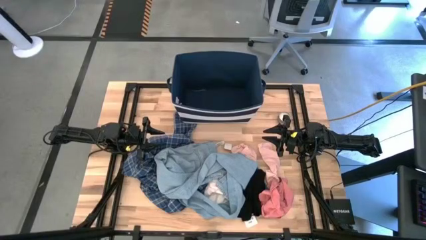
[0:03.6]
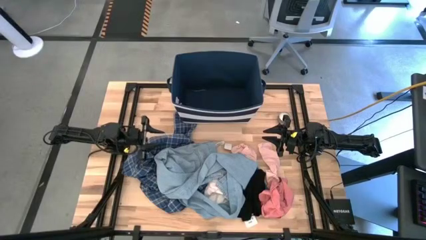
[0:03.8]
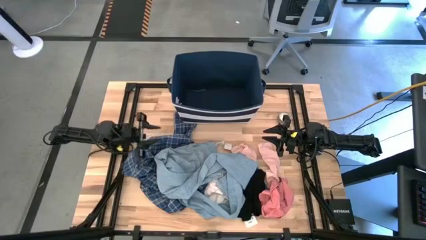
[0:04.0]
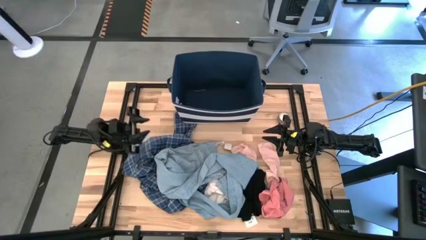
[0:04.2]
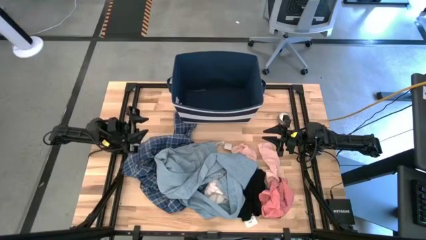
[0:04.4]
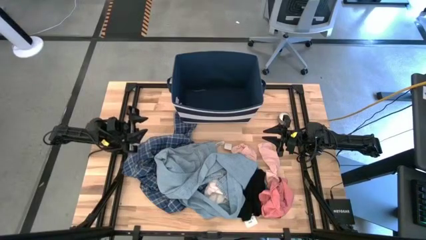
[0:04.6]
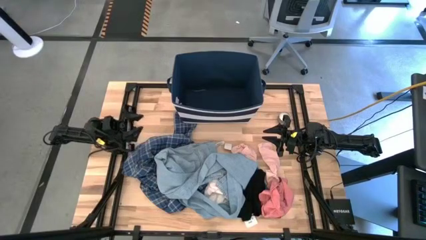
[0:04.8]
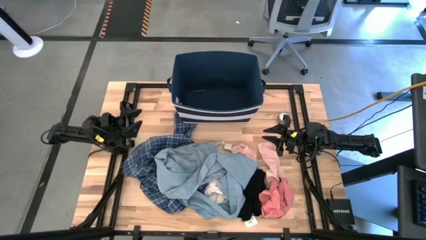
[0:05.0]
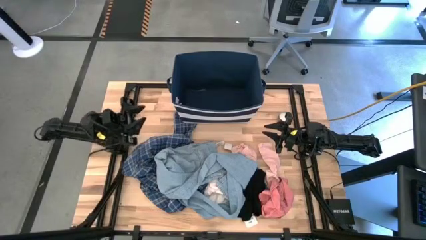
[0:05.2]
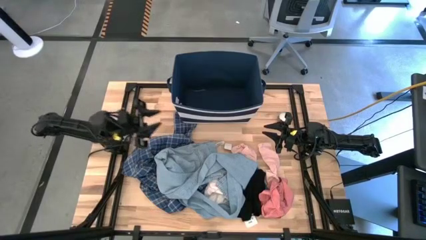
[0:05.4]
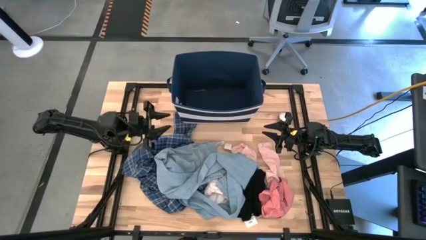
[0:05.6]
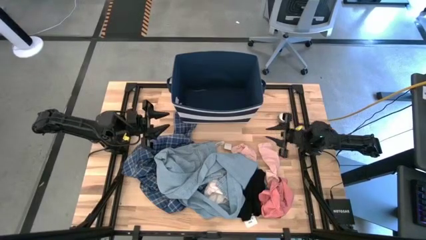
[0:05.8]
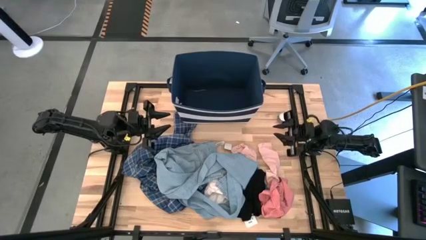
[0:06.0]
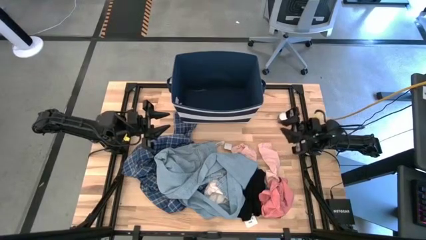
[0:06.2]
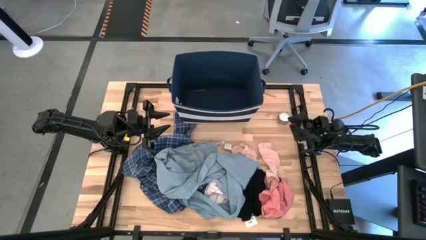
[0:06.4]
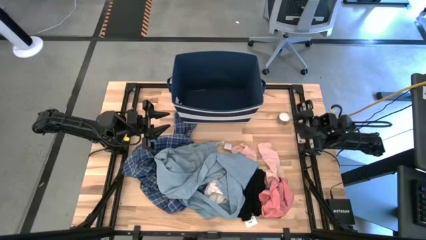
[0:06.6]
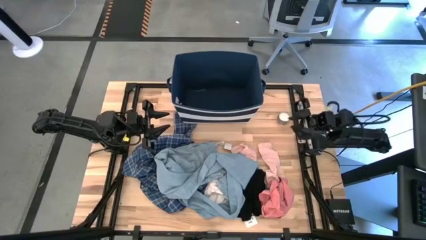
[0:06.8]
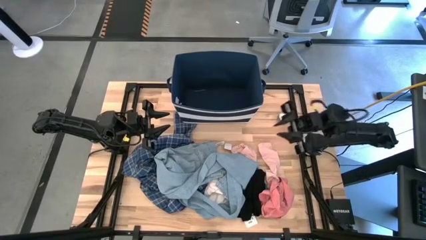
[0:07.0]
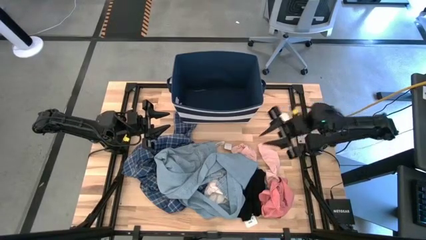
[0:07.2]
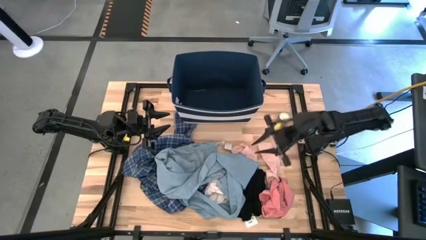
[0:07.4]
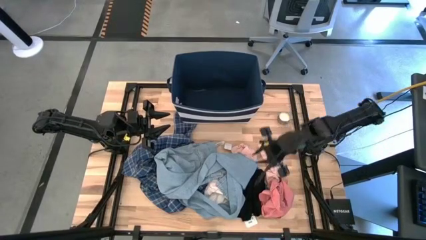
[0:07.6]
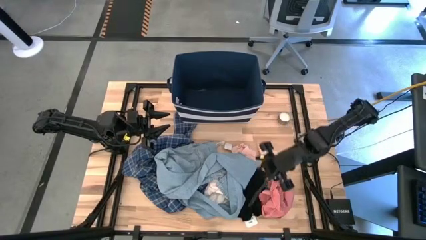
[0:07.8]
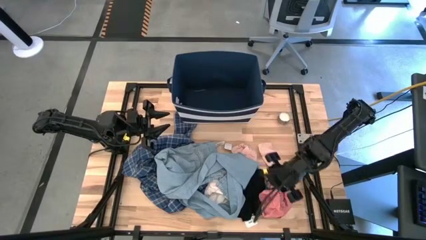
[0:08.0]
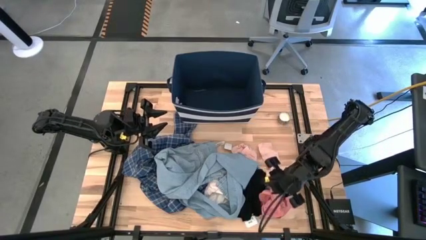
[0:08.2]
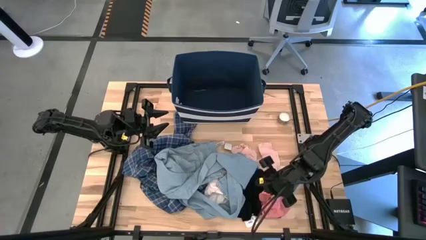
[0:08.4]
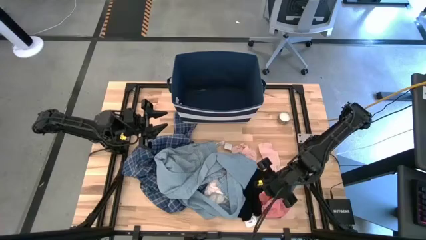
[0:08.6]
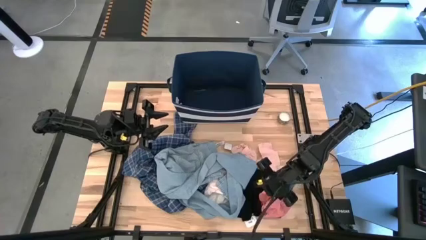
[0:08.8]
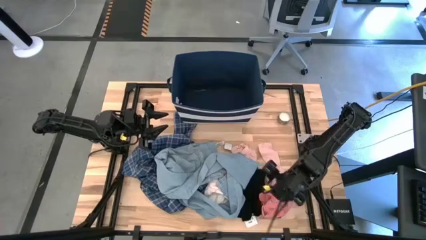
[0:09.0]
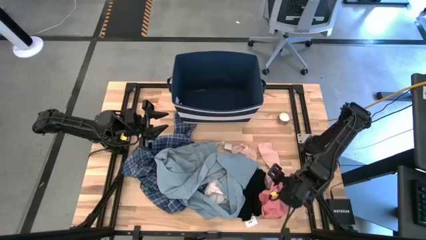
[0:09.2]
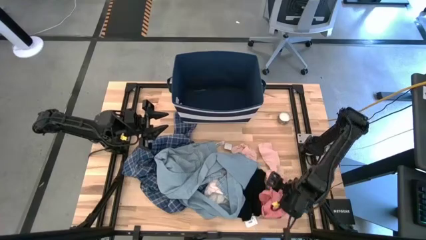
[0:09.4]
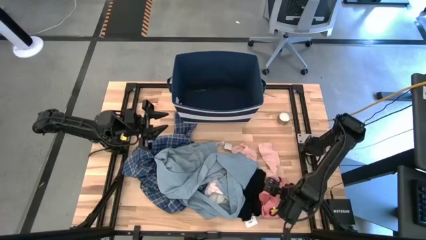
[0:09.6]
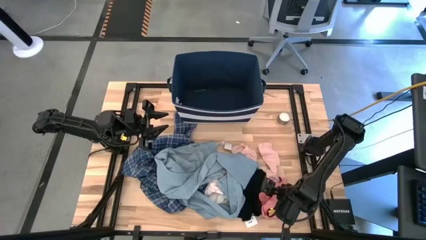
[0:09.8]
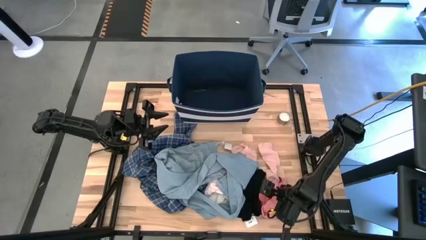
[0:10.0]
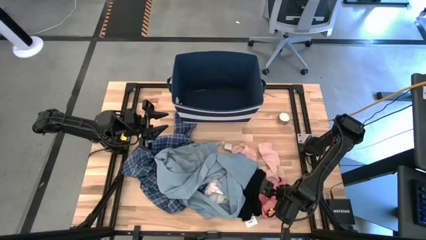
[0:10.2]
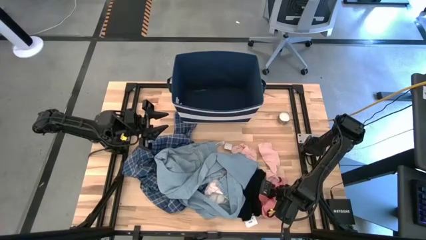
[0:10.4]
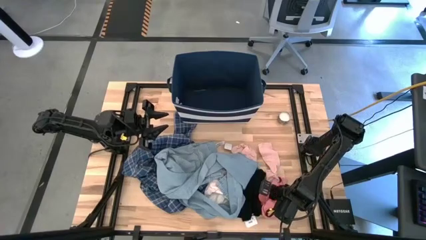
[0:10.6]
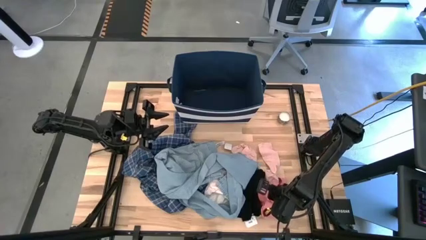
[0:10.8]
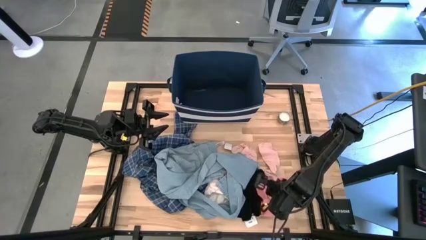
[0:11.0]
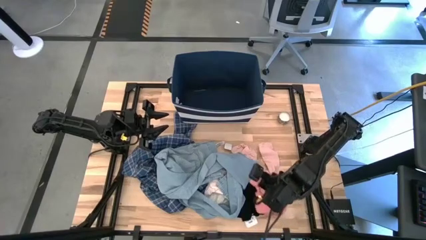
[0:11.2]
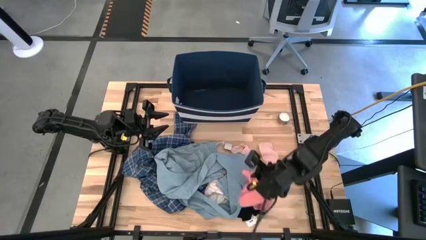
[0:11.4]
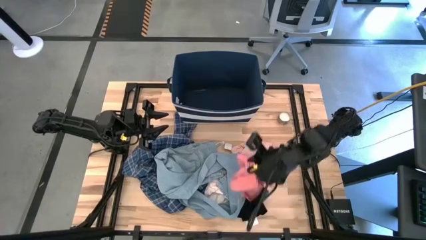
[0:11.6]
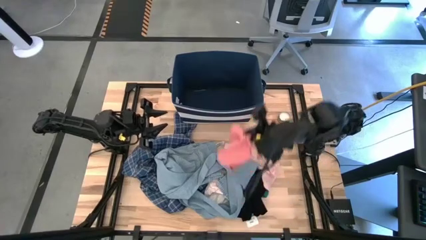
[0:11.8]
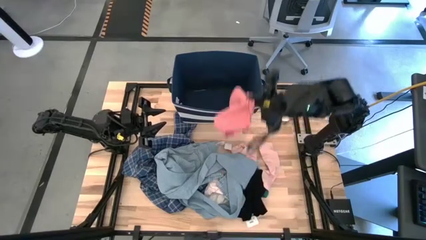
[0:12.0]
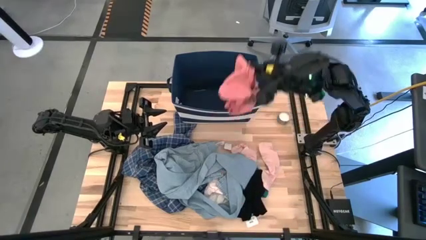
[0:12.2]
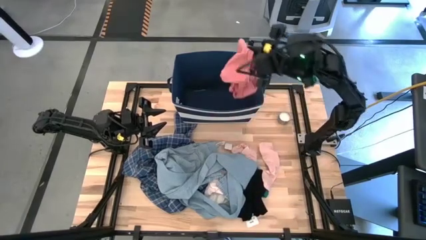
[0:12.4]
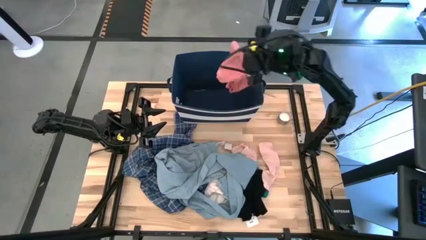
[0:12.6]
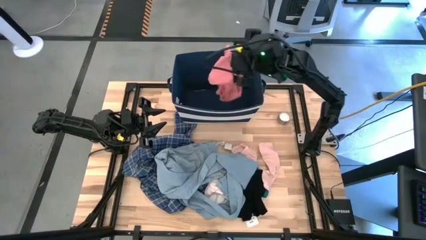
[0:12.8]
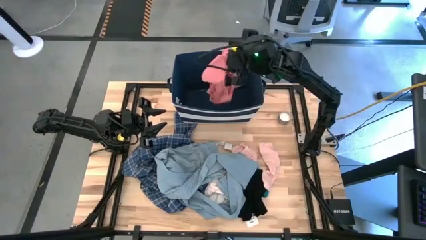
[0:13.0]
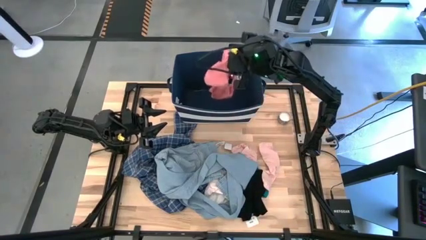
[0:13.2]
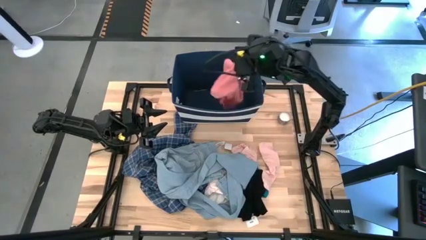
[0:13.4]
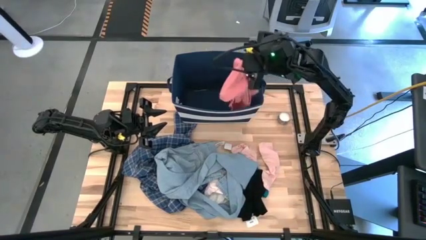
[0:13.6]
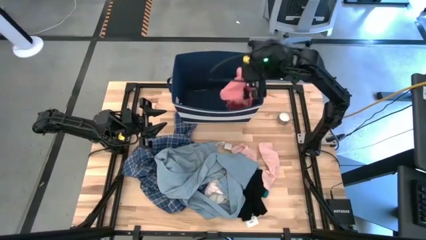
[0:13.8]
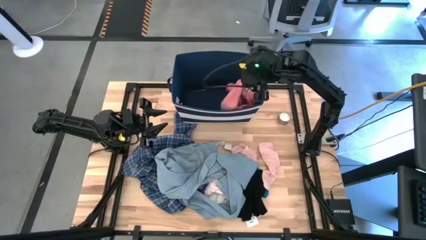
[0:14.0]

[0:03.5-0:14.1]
Task: Sort clothes
Put the pink underwear into the blue laundry bin

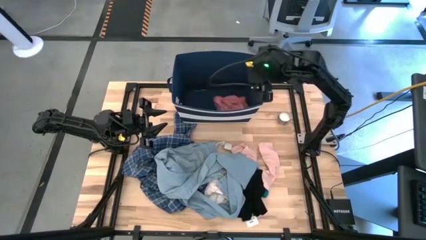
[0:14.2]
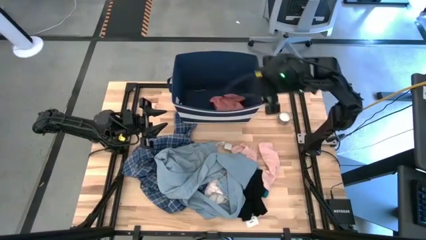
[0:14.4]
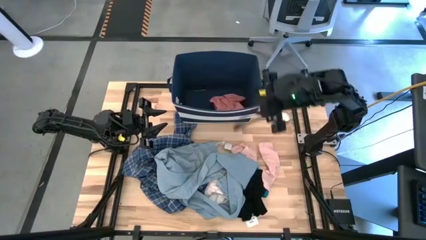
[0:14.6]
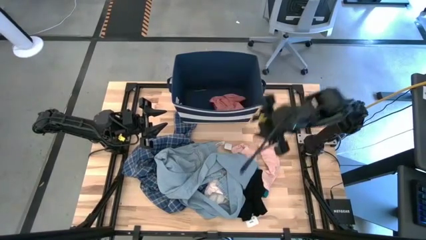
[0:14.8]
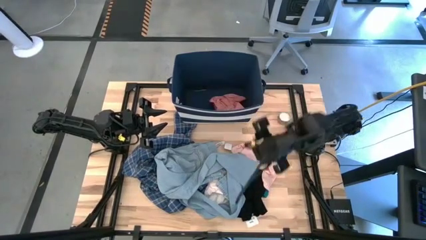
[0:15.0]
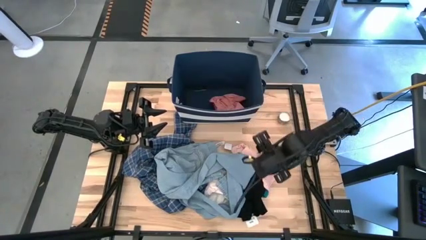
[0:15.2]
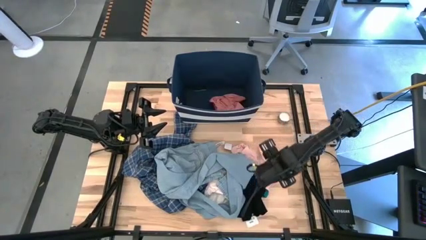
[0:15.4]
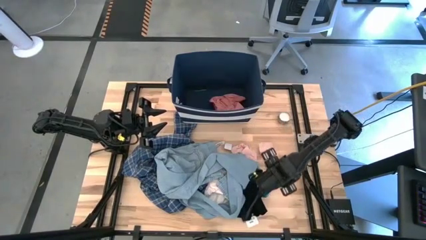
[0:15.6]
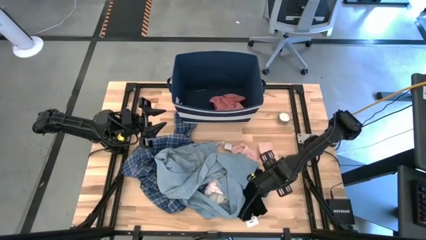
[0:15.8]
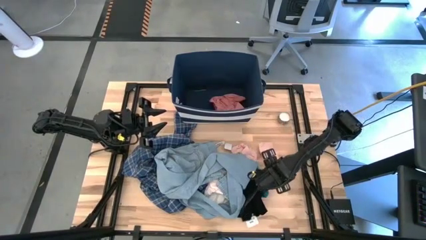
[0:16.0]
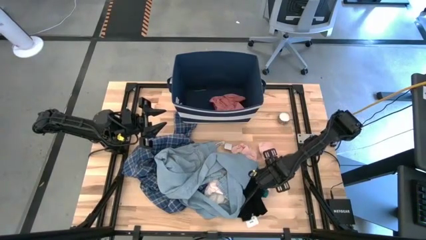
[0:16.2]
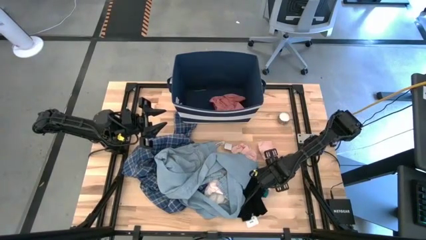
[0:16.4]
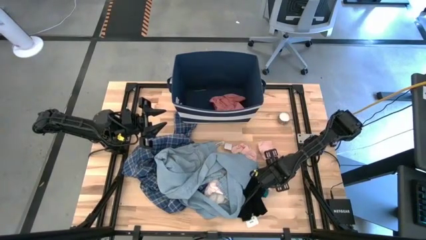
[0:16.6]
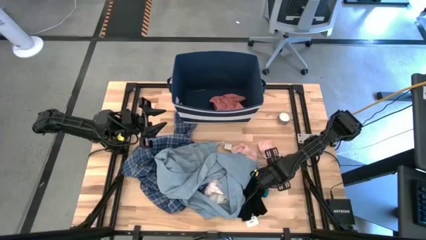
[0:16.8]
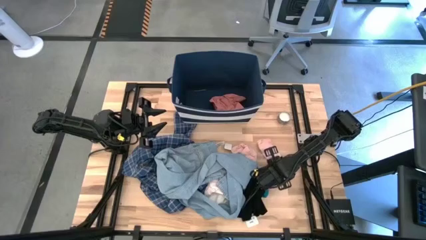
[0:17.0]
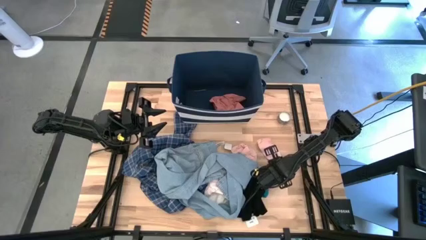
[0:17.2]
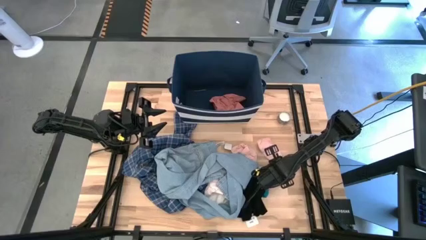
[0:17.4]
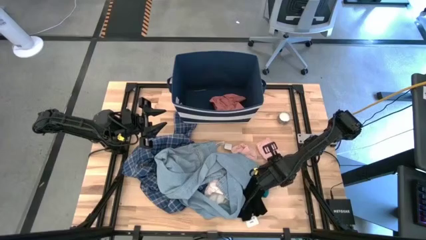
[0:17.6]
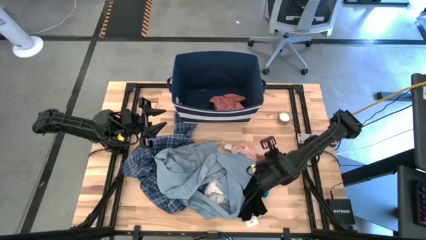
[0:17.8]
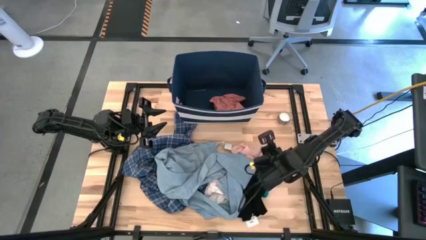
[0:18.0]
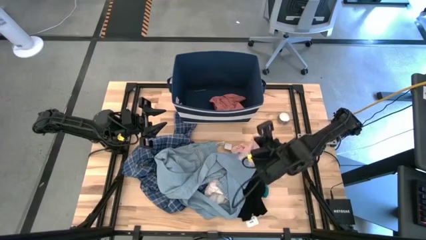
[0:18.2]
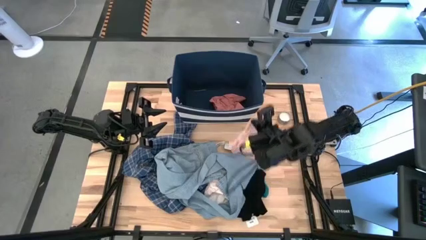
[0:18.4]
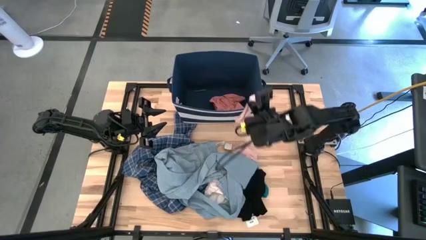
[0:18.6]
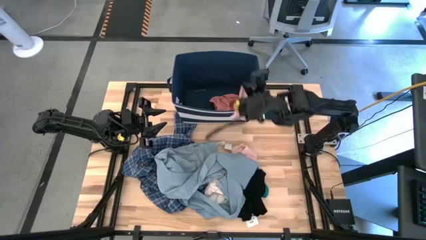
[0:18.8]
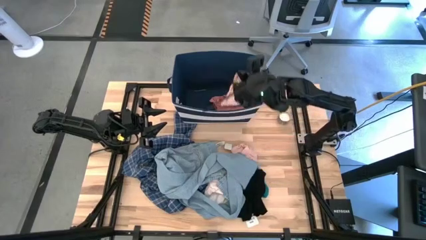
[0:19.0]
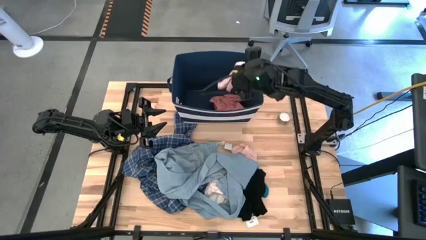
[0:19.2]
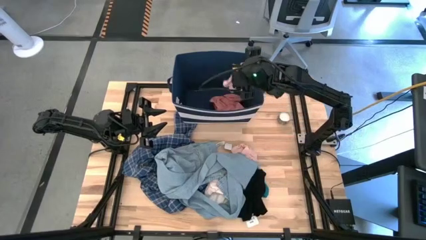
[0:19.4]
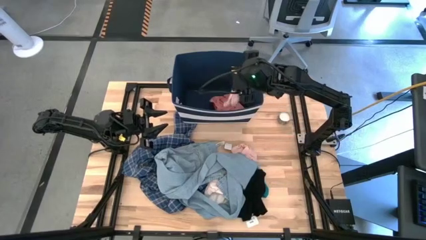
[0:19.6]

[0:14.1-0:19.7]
Put the pink sock into the blue laundry bin

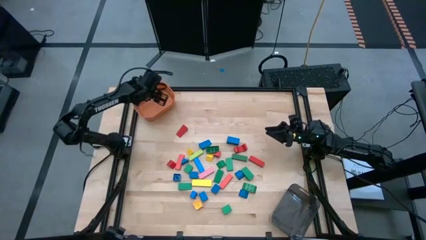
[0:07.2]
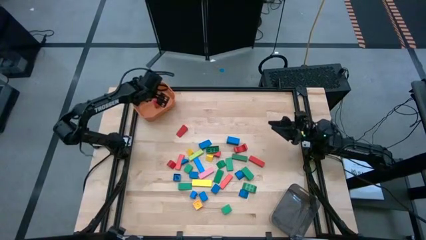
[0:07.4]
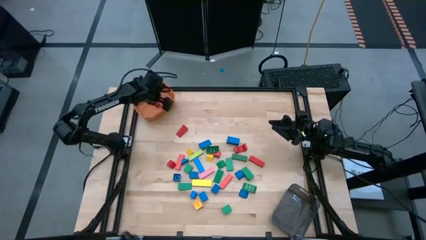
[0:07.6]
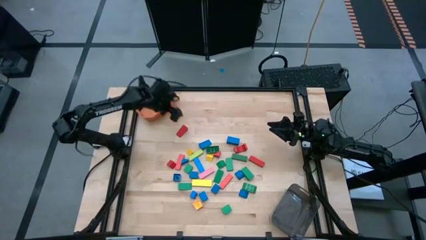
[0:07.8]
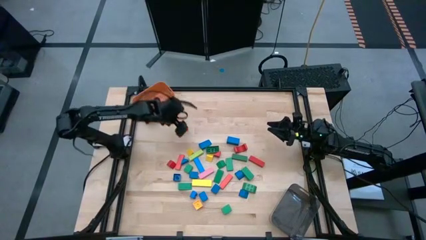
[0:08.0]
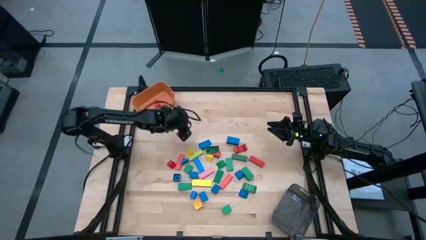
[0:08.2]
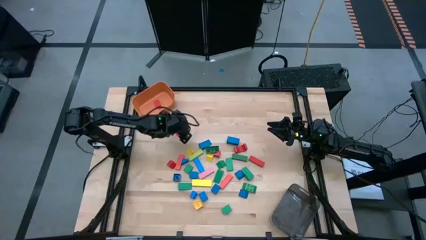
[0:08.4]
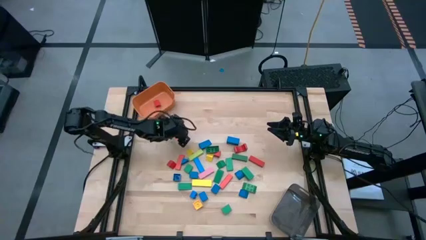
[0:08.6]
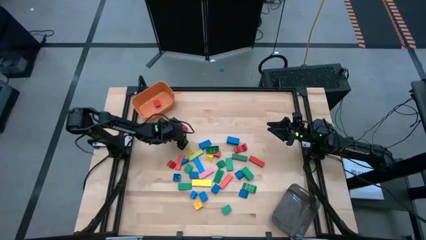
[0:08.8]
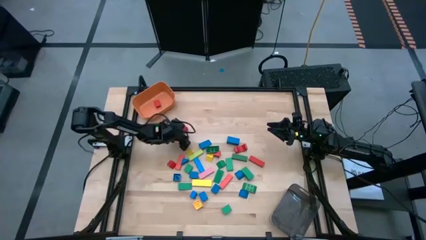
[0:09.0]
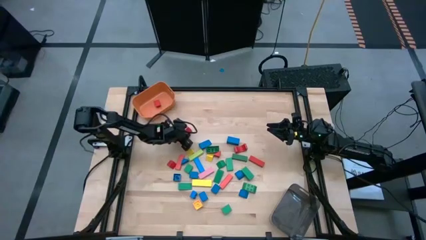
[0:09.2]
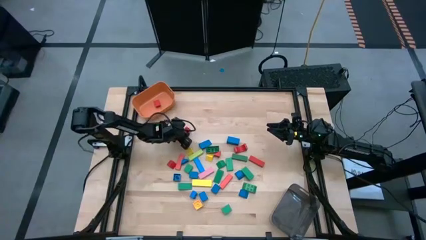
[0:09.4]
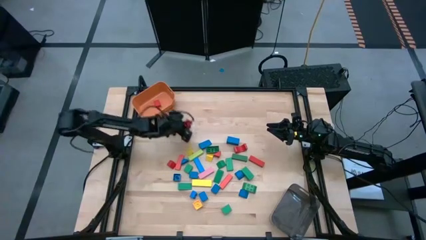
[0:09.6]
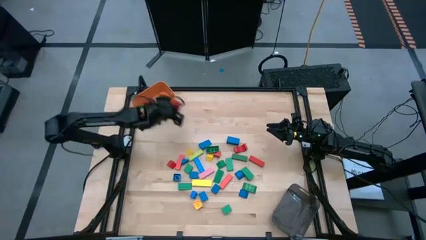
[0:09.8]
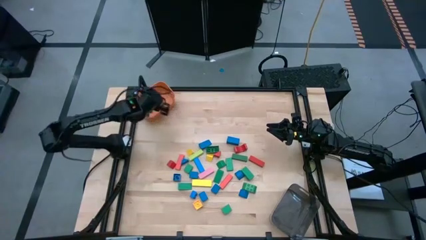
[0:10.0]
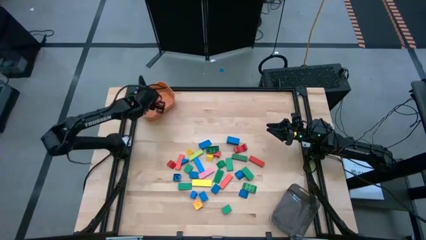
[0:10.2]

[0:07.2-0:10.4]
Task: Sort blocks by size
Put the big red block into the orange bin
